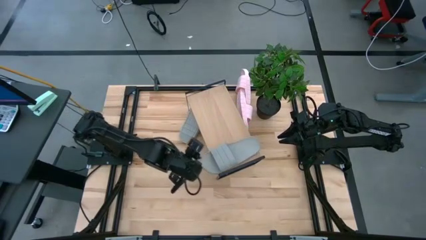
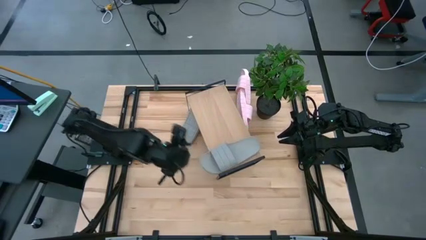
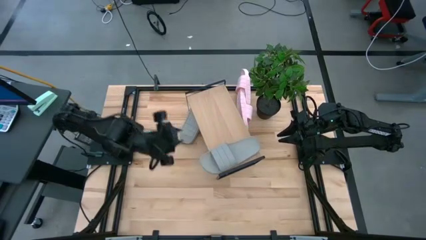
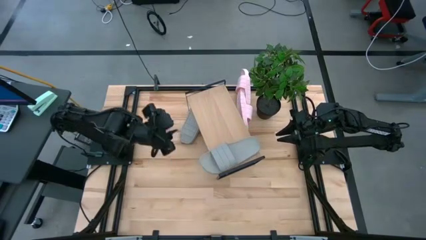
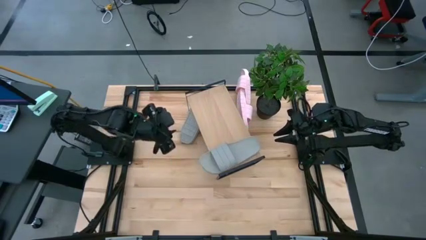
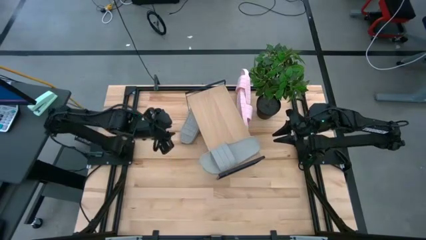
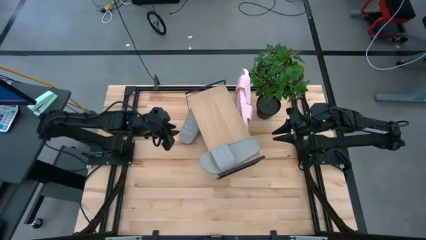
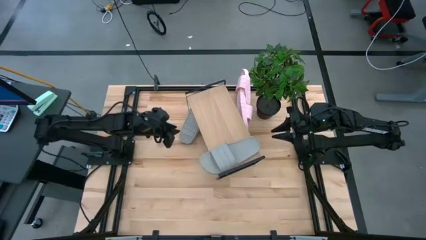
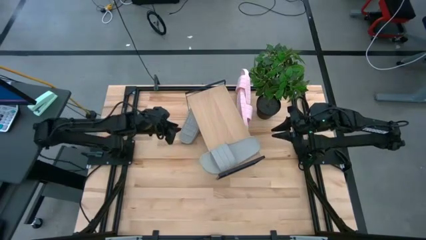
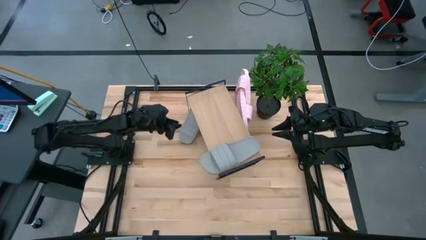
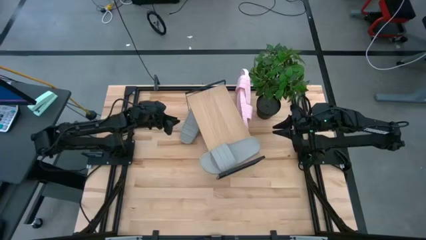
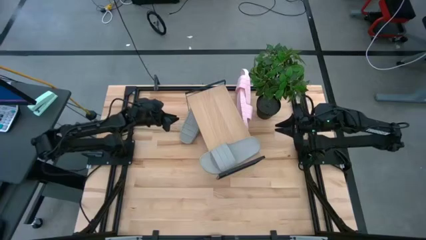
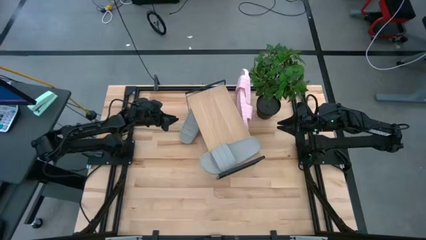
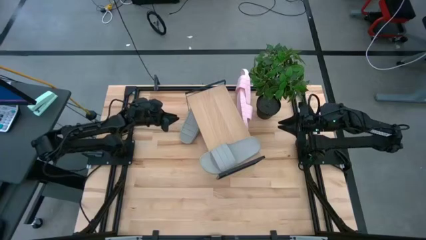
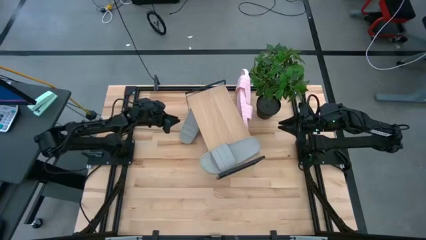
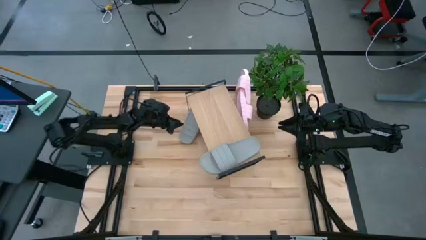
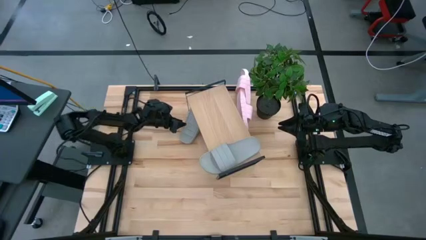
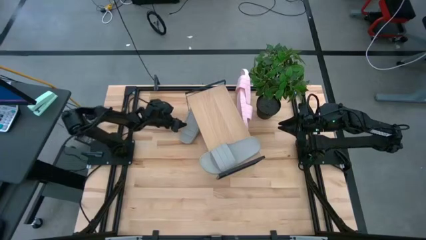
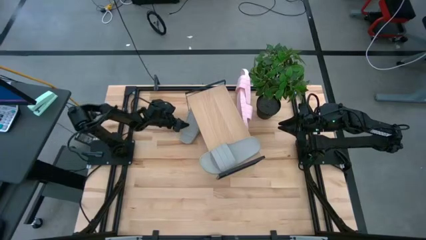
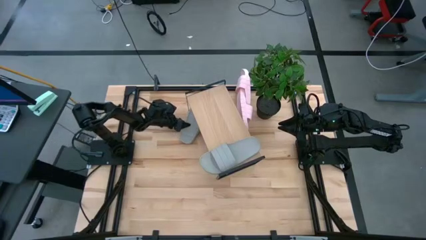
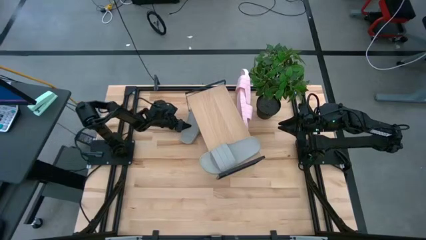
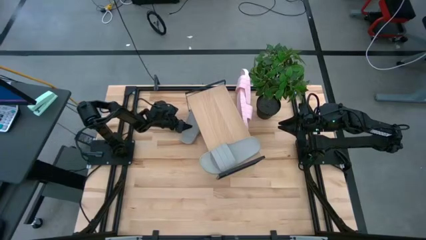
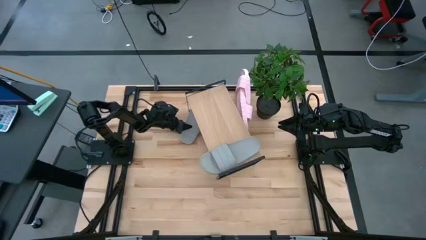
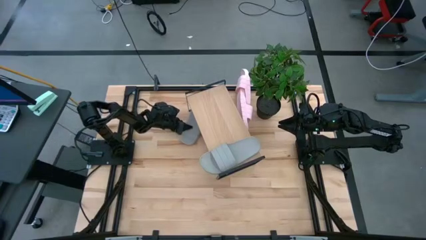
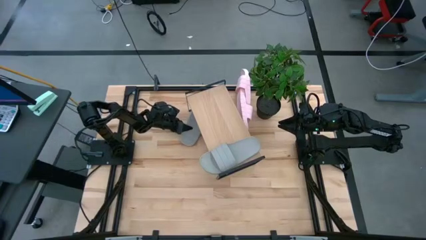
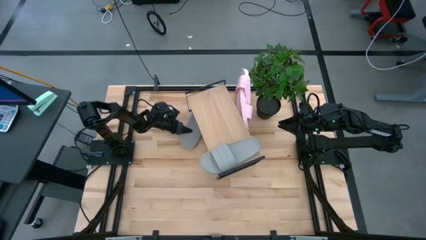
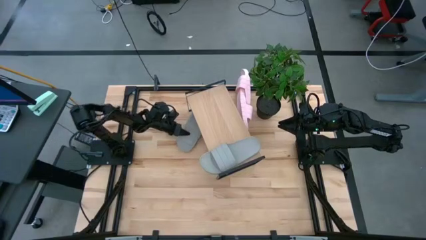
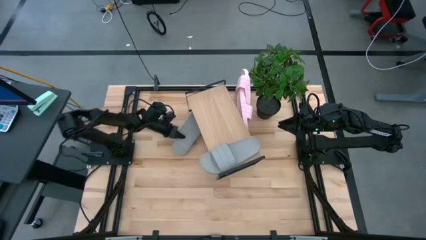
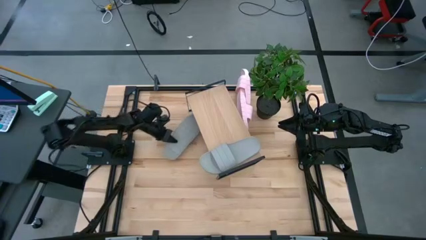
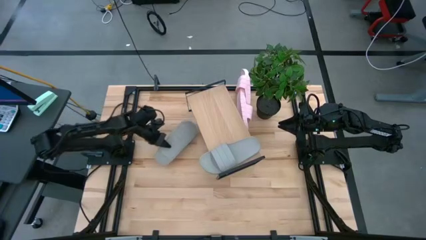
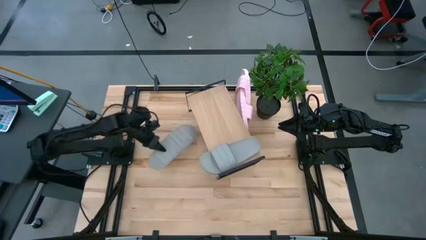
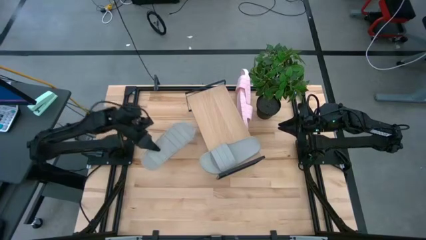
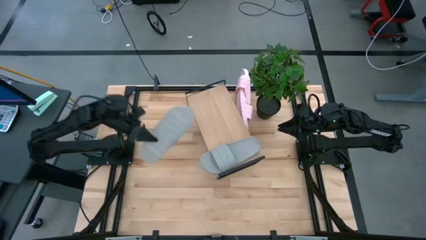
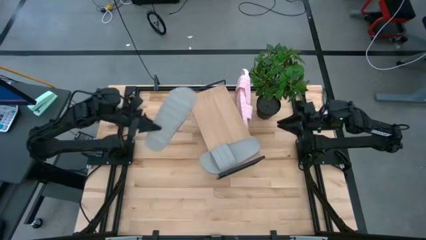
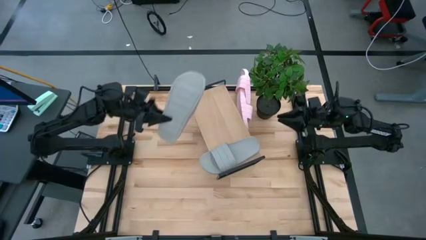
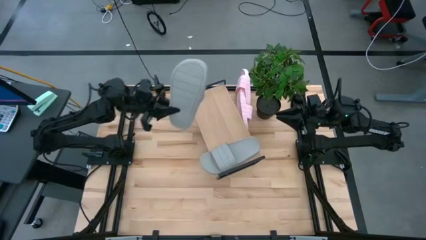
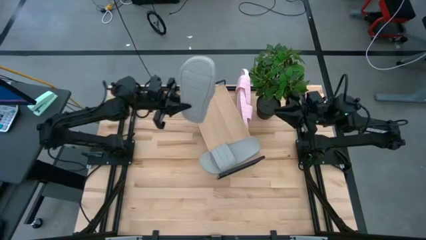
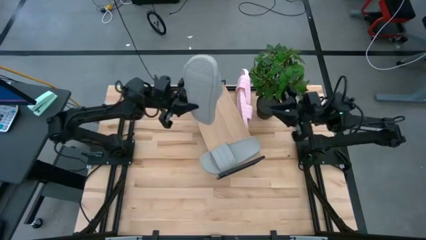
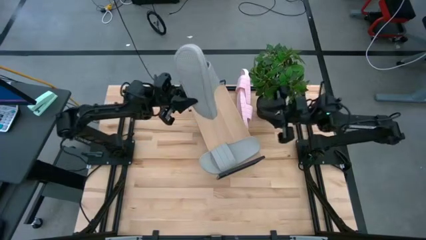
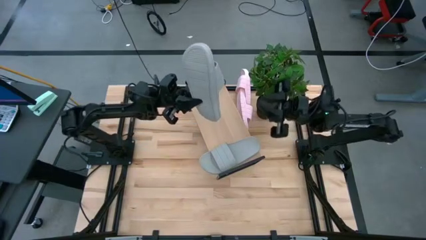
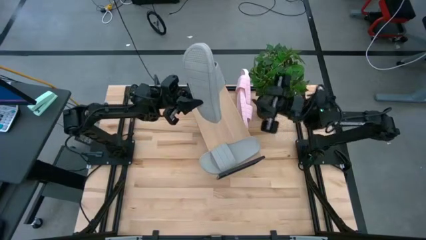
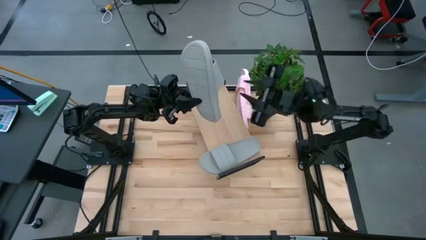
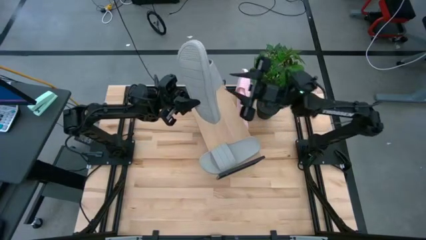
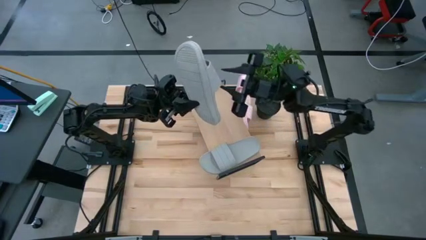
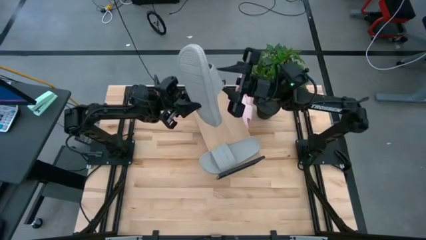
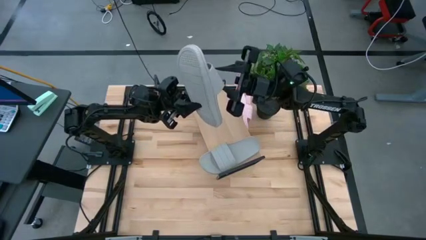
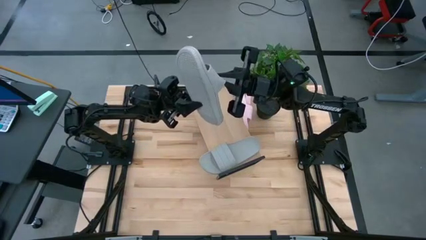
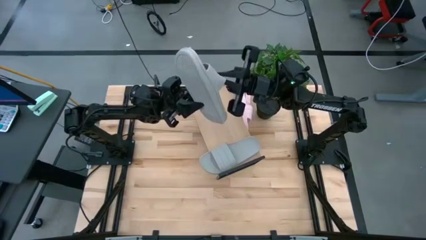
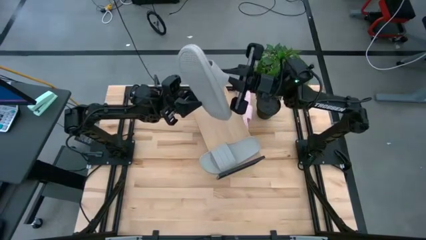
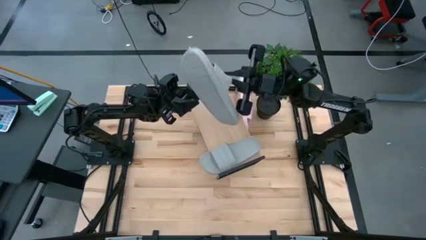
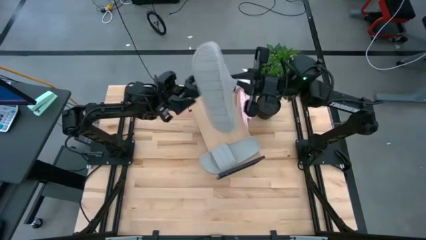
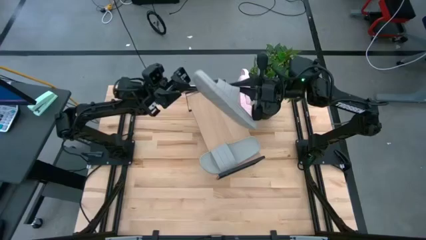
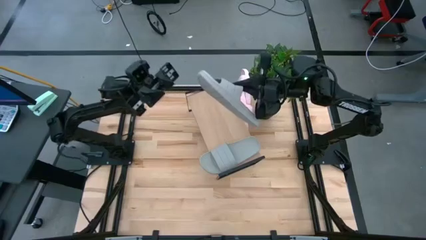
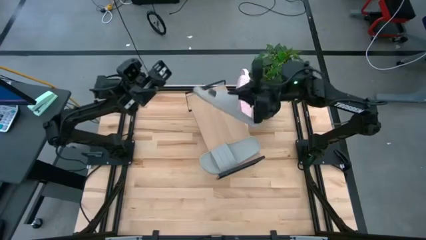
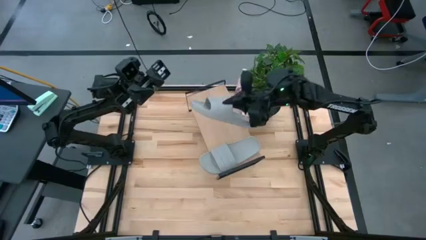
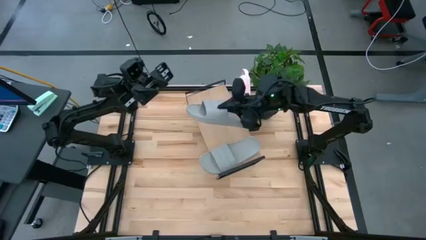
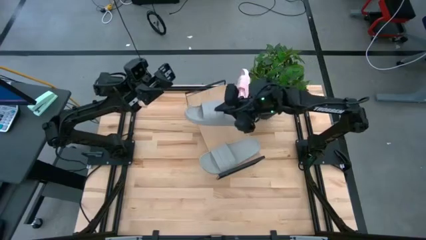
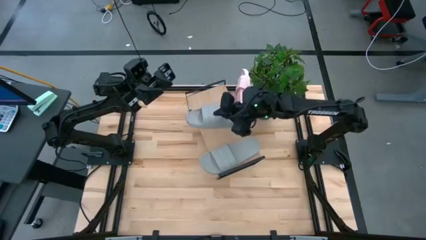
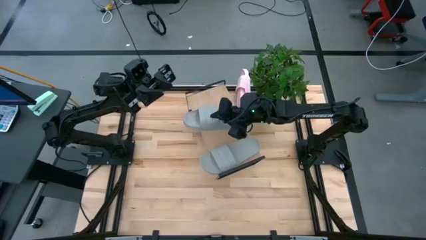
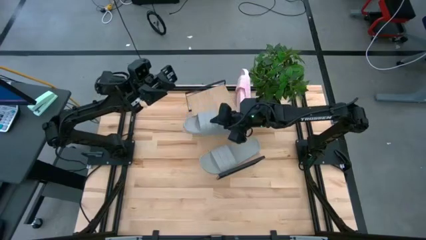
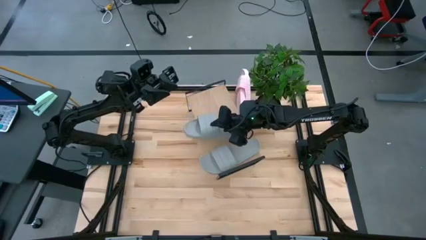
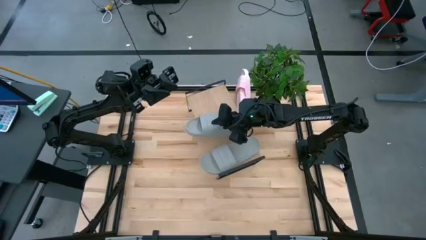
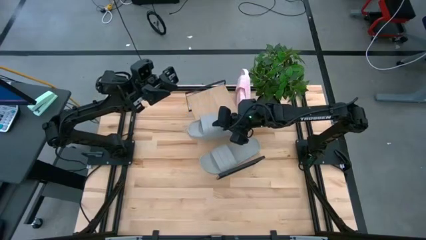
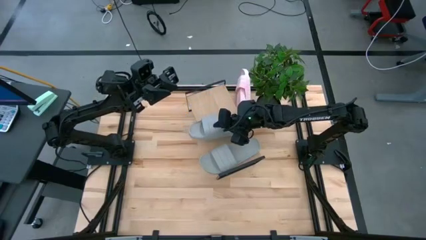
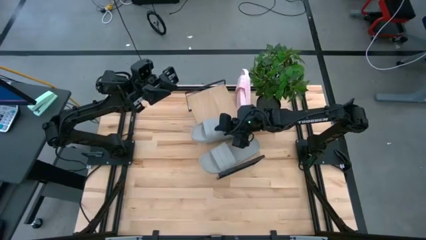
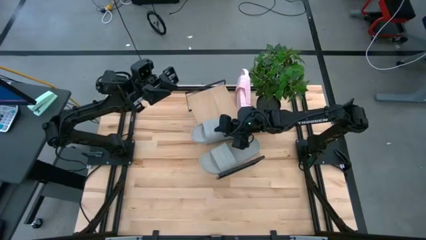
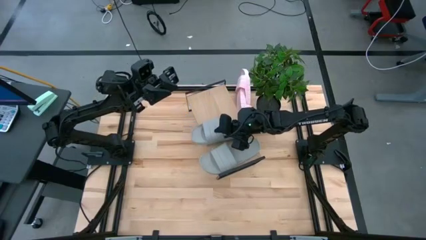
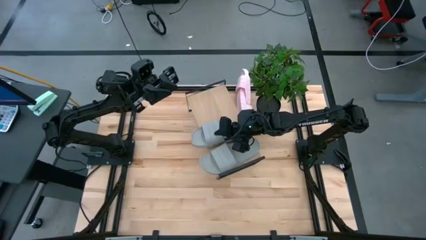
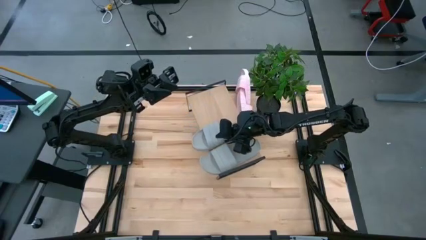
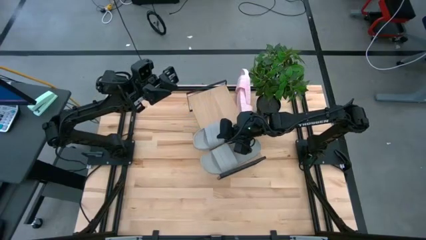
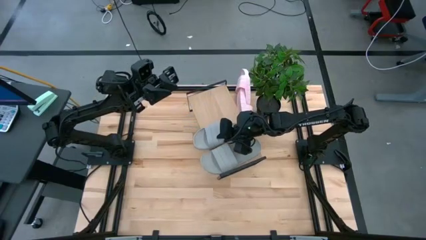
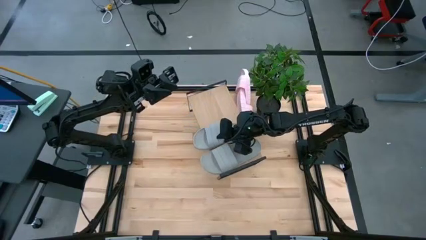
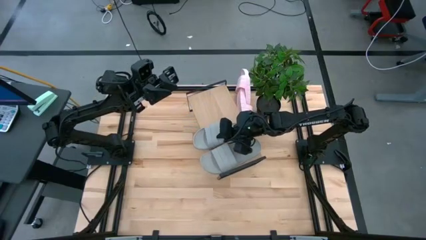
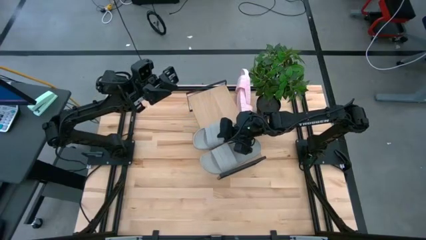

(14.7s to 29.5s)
Task: Pick and place slides into the shelf
Put the gray slipper on the shelf
